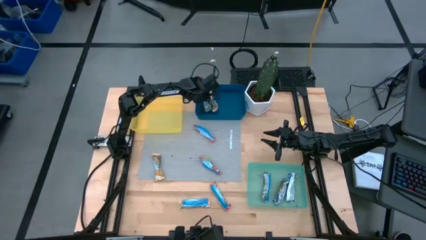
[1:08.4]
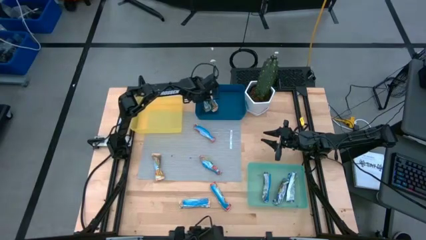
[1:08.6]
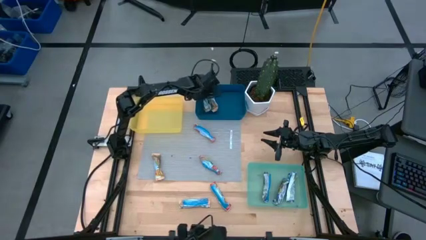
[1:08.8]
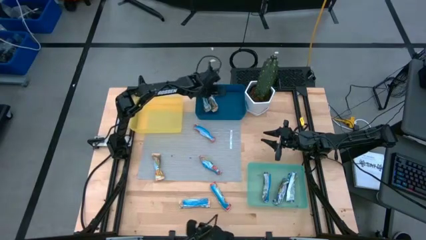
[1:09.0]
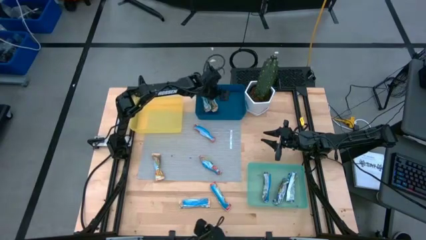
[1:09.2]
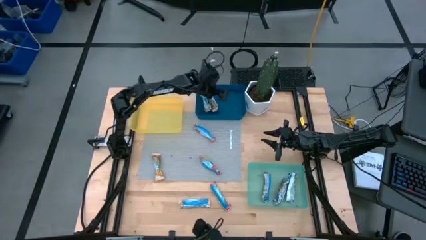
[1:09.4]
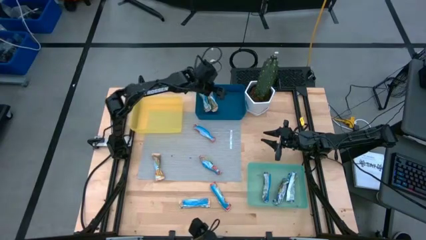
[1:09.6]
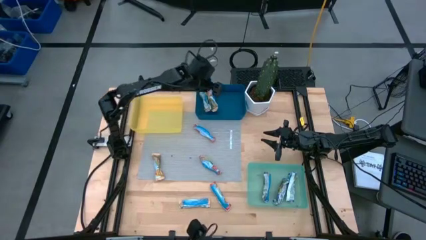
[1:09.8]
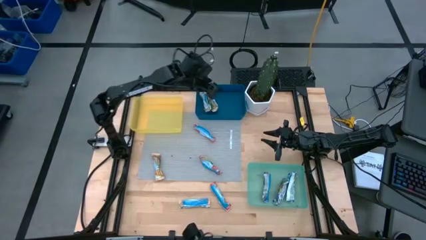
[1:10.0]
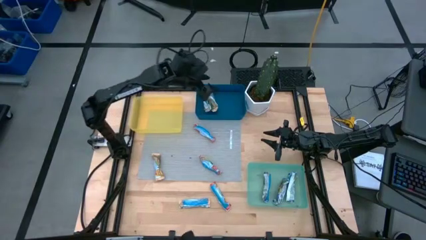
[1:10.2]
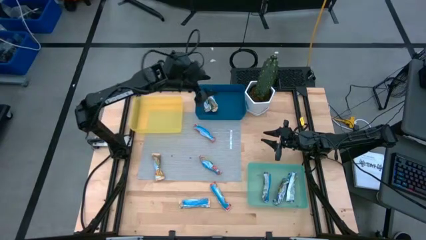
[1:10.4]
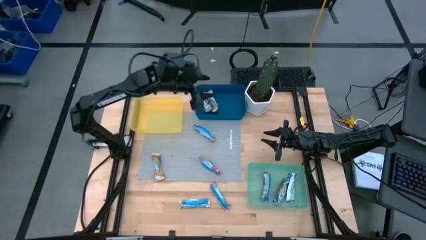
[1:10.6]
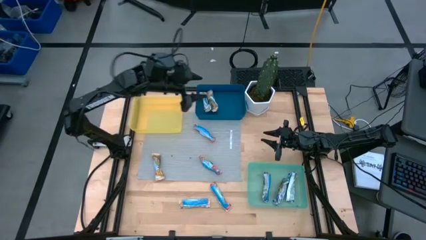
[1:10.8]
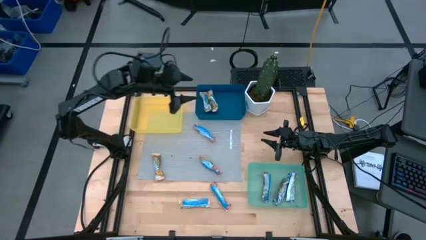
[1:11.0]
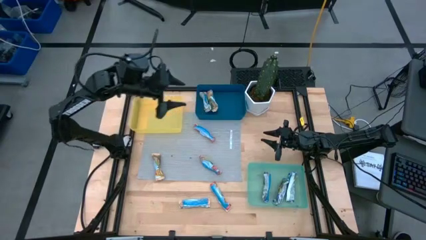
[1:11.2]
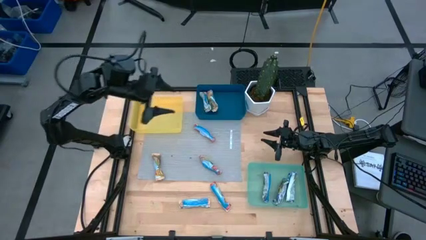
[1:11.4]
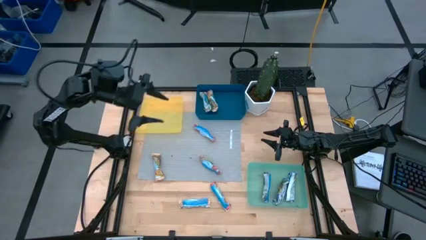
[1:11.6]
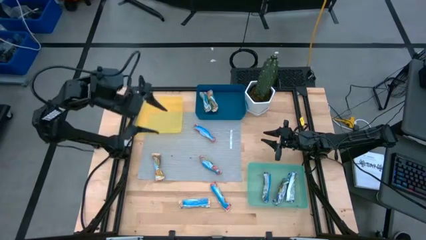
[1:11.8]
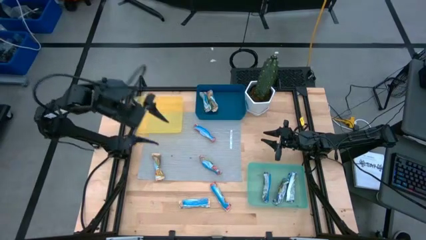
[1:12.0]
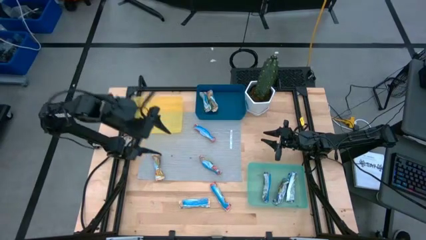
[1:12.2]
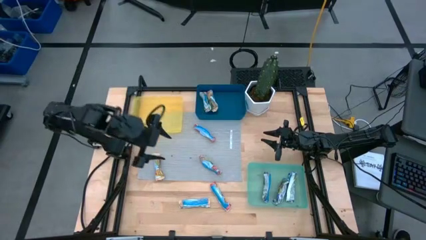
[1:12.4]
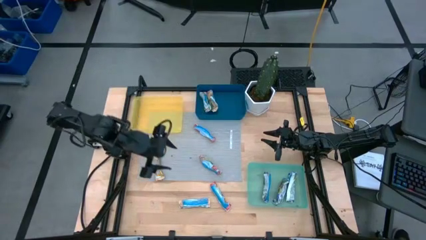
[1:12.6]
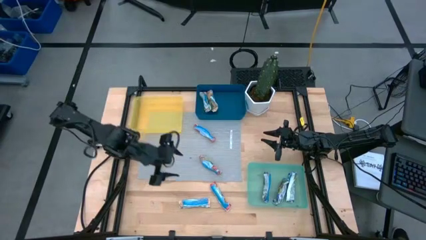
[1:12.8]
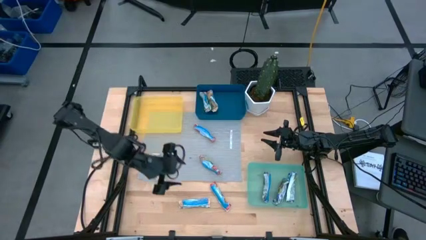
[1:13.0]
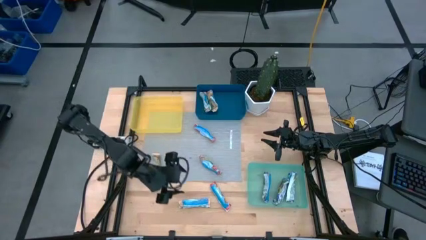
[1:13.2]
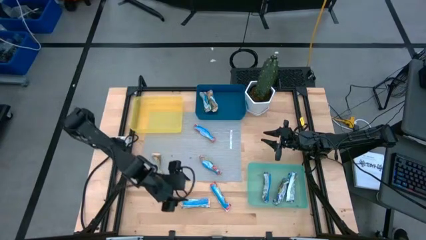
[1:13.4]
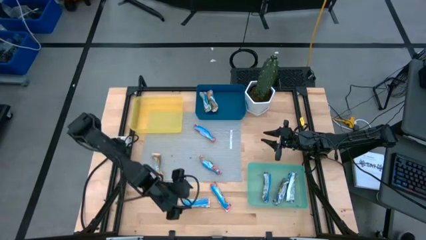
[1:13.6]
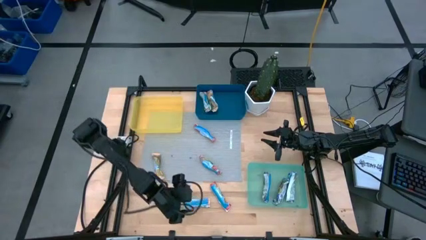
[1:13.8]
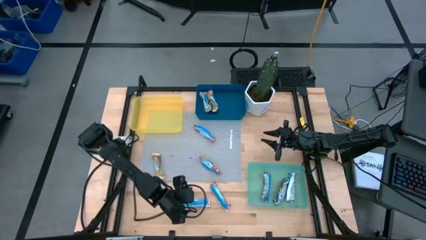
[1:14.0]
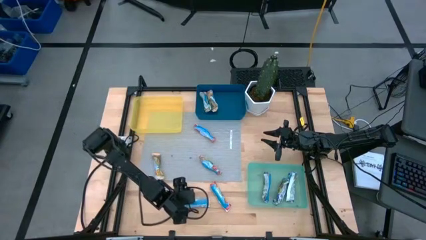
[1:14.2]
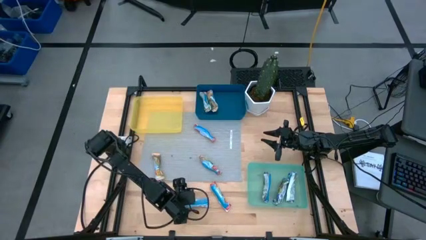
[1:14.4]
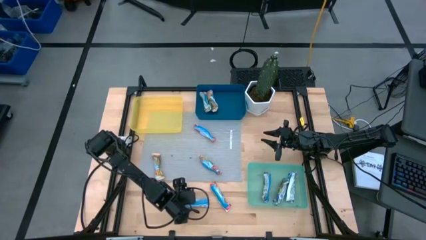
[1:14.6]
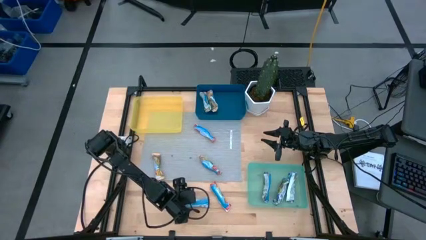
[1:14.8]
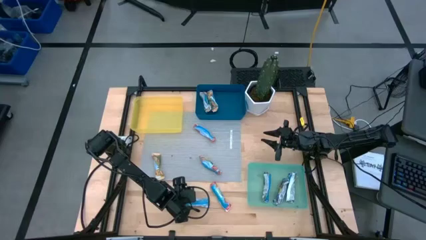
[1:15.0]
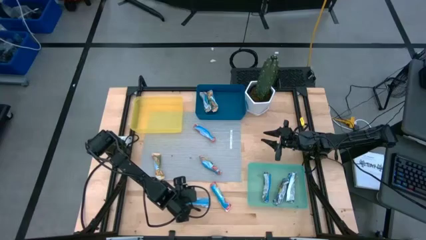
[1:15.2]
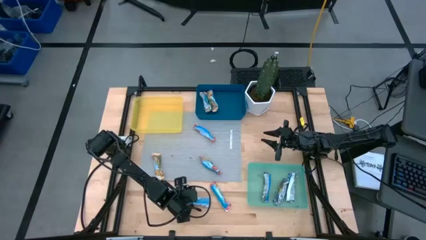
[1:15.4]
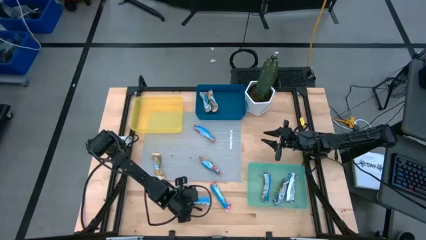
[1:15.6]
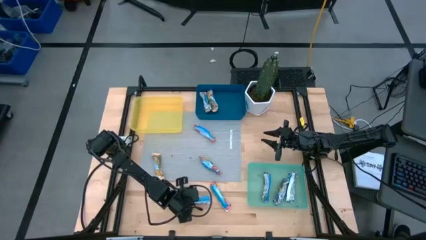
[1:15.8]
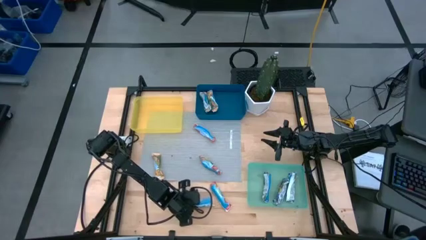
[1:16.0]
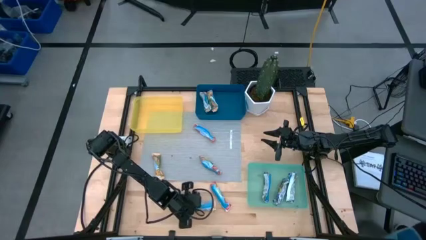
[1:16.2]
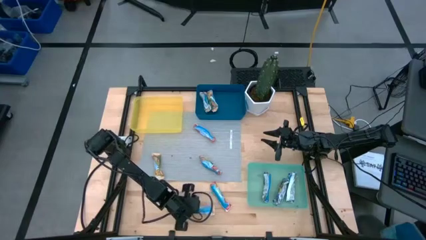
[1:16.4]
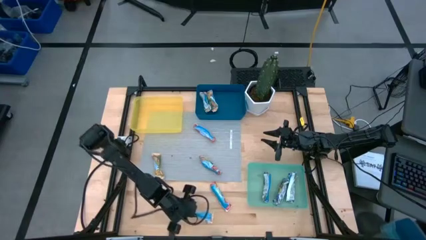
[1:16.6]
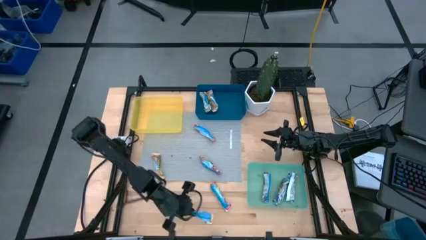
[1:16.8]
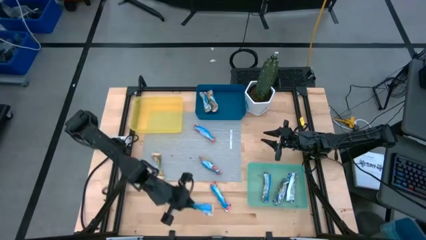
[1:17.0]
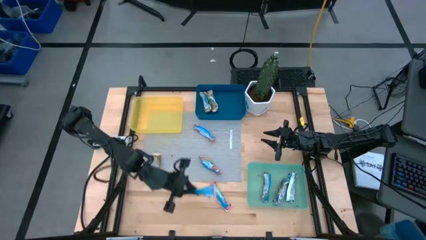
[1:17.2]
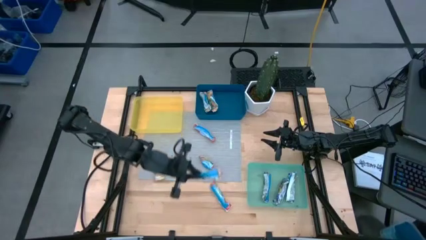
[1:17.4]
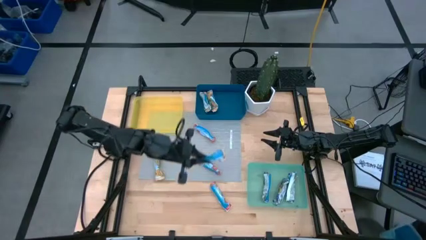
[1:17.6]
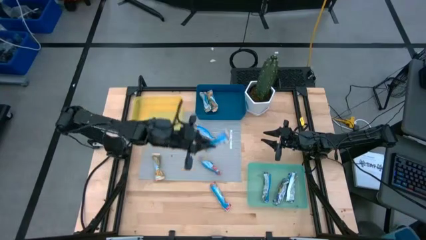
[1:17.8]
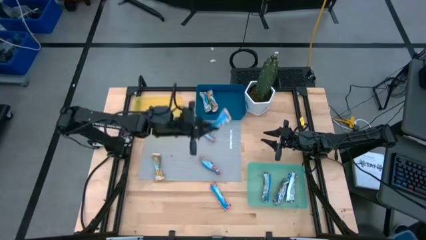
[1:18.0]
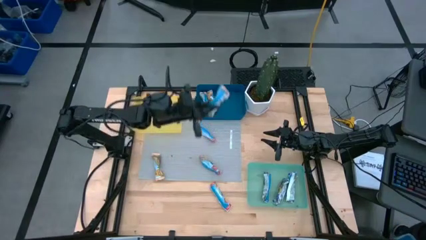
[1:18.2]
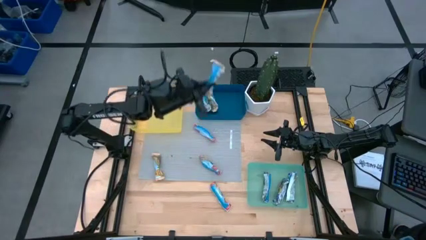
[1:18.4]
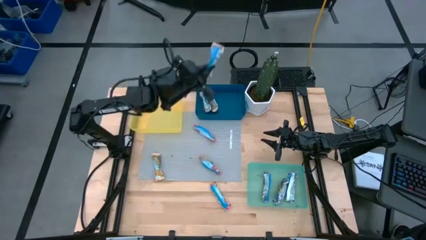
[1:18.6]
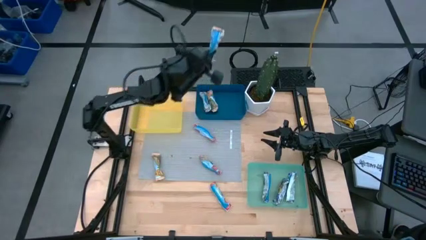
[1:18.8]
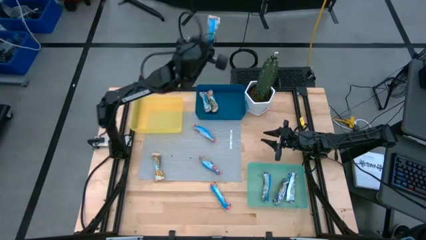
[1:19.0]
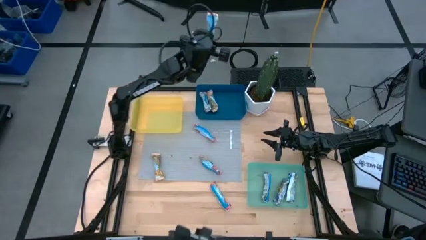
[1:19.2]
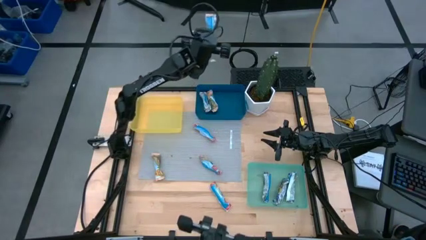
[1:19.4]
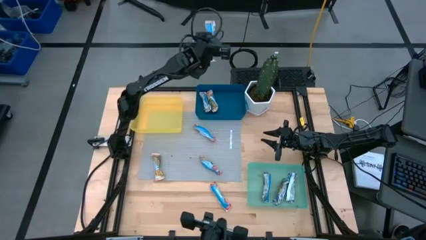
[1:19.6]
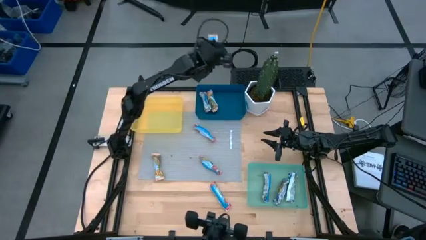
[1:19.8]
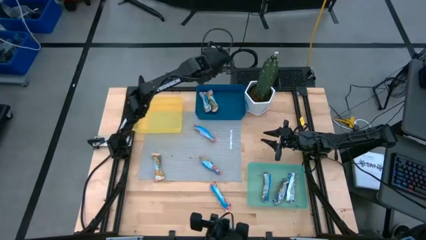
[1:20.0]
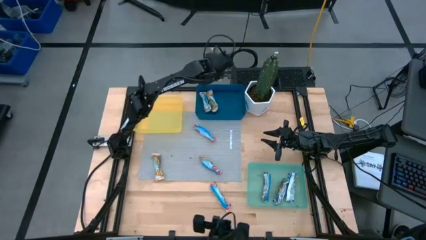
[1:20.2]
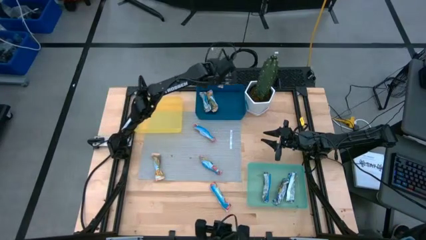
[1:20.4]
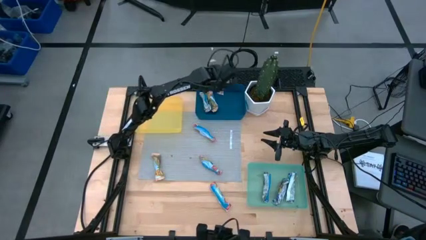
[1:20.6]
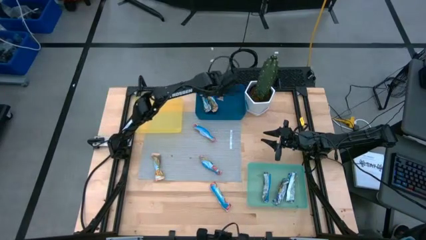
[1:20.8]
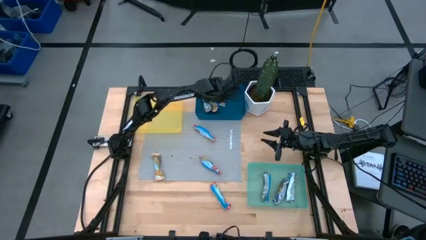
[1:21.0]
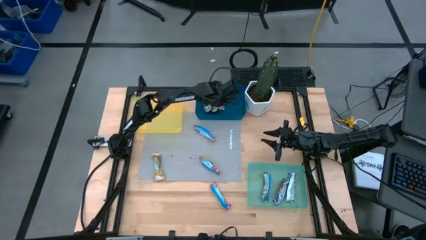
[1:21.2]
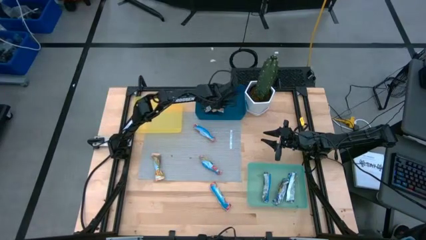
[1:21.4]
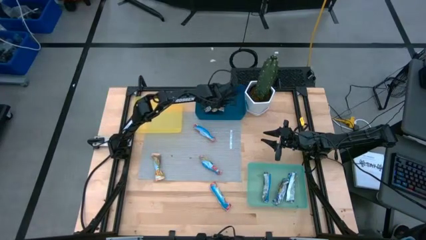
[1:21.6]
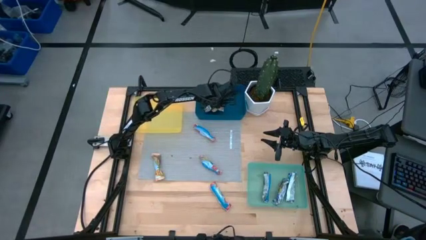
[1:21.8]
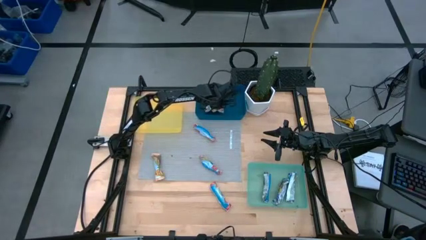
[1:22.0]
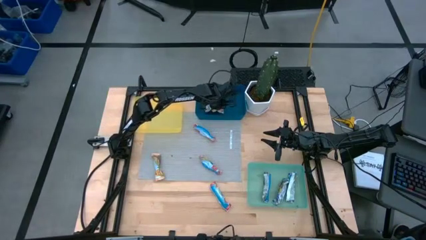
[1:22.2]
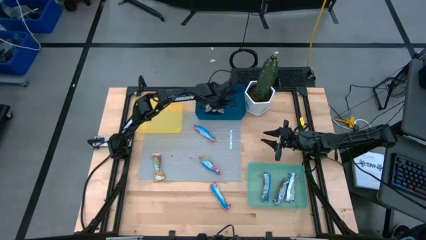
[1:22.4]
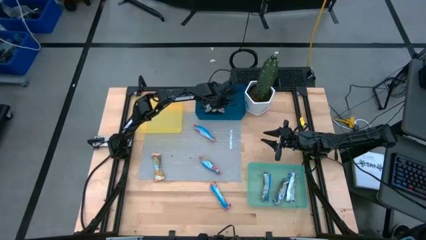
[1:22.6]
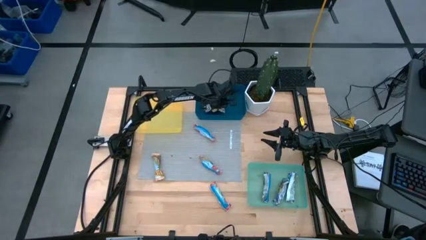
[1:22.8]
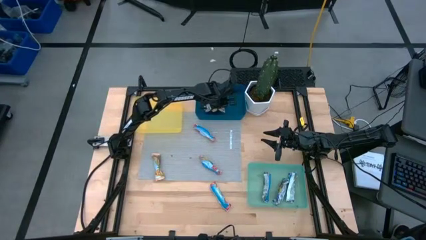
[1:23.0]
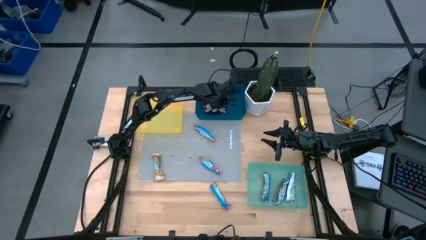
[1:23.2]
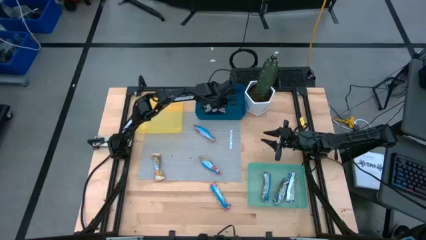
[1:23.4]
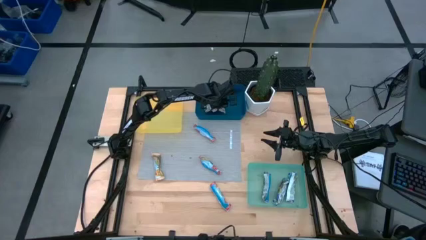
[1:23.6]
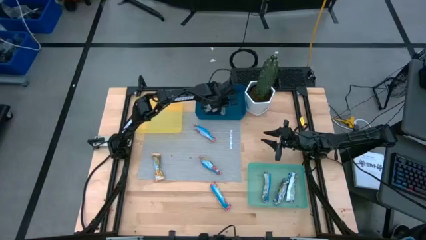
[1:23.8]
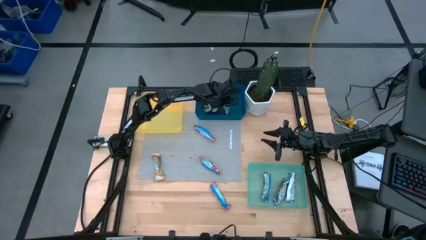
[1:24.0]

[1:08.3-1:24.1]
Task: Pick and place Granola Bars by type
Put the yellow granola bar into the blue bin
